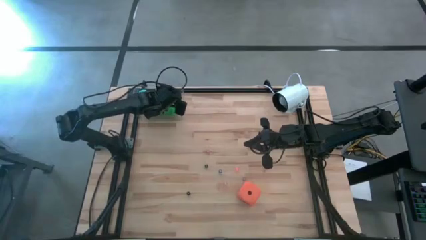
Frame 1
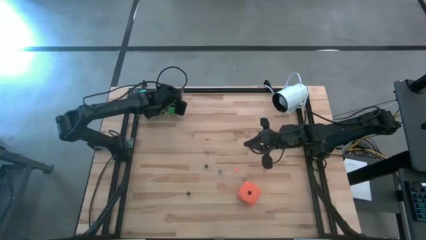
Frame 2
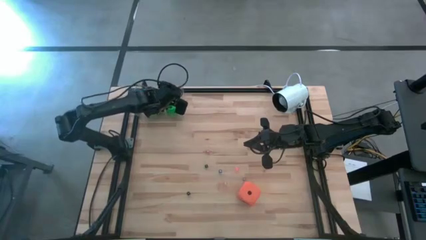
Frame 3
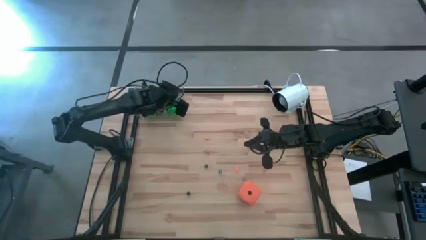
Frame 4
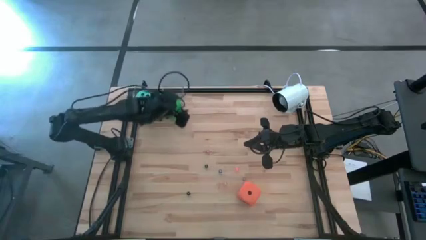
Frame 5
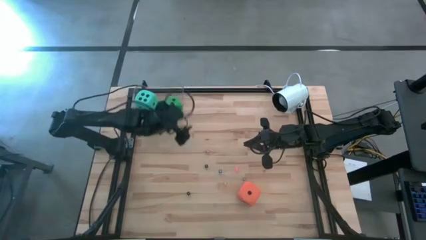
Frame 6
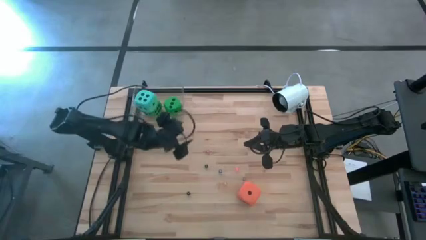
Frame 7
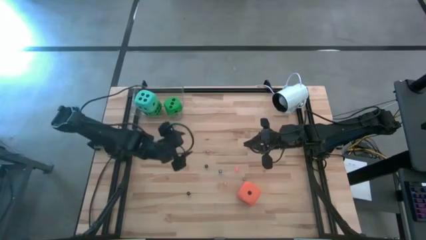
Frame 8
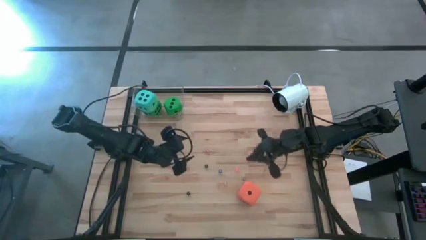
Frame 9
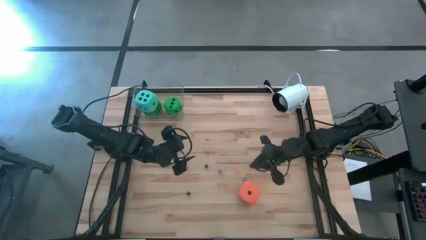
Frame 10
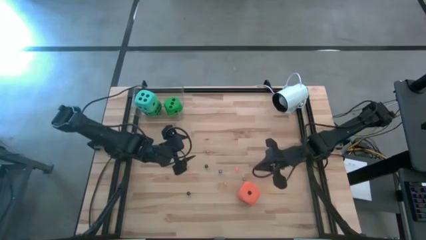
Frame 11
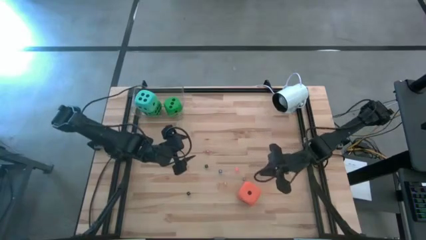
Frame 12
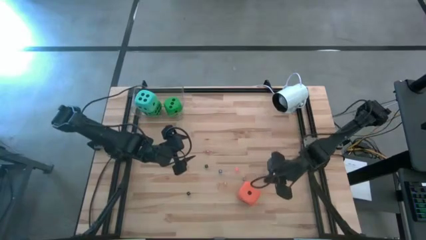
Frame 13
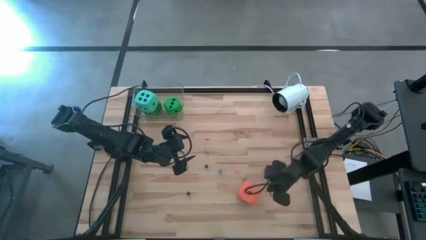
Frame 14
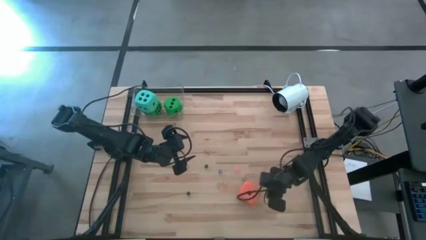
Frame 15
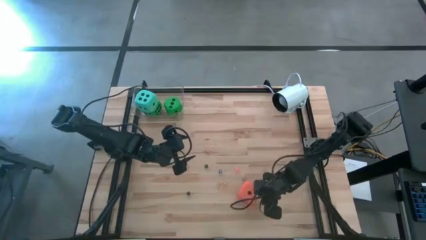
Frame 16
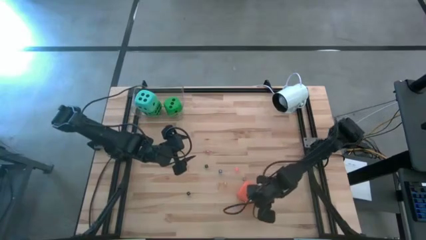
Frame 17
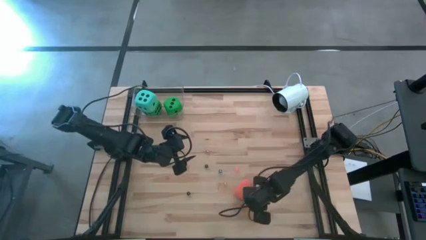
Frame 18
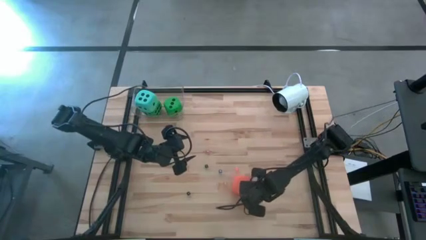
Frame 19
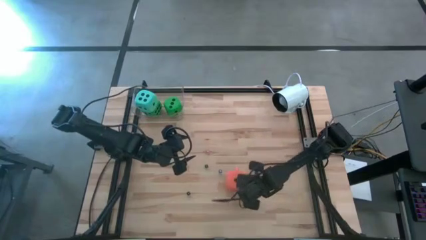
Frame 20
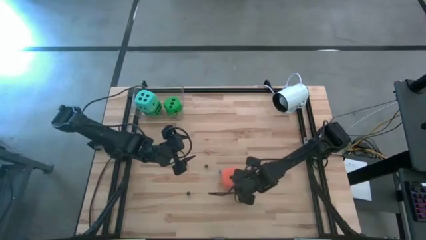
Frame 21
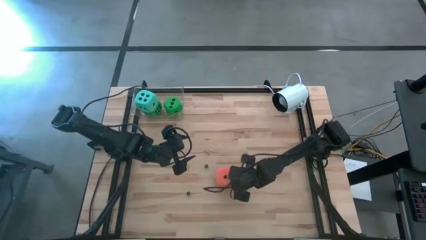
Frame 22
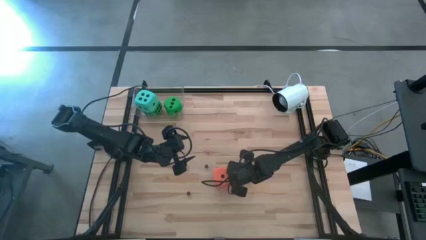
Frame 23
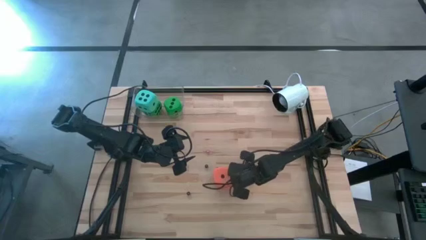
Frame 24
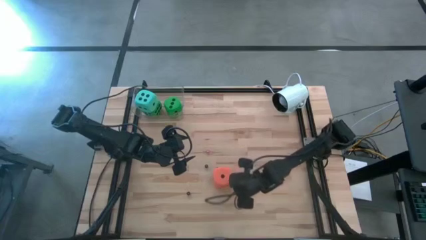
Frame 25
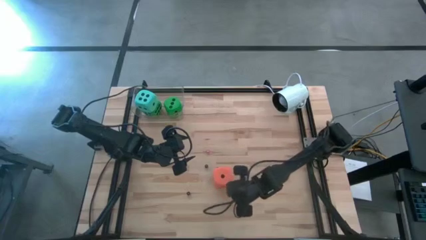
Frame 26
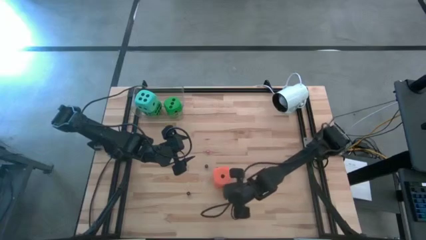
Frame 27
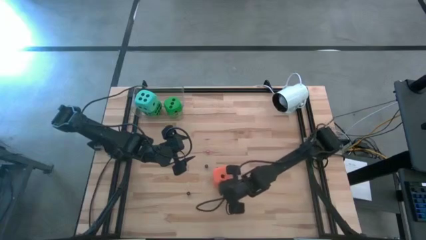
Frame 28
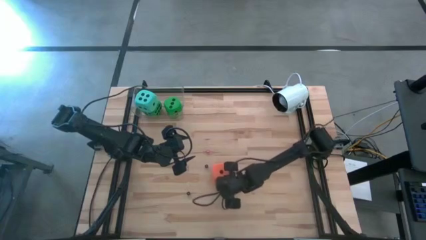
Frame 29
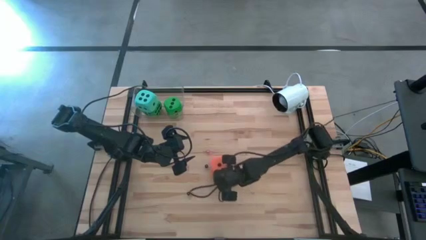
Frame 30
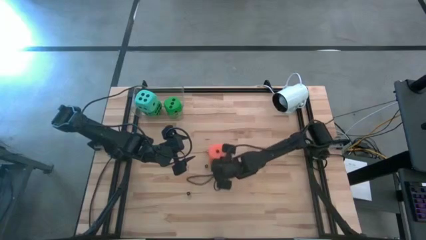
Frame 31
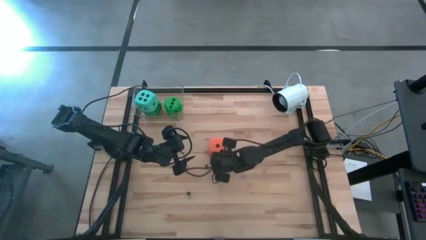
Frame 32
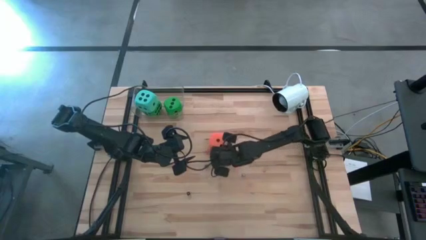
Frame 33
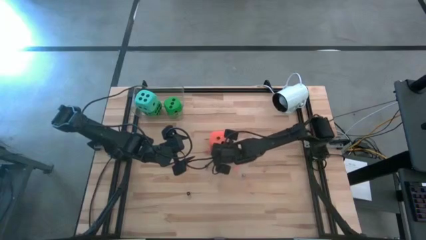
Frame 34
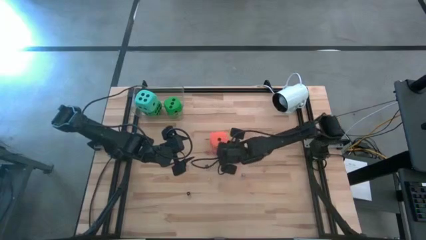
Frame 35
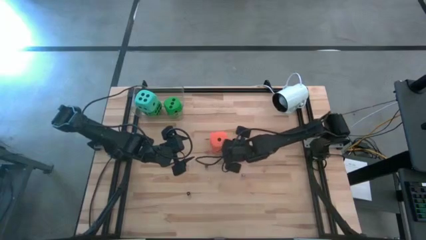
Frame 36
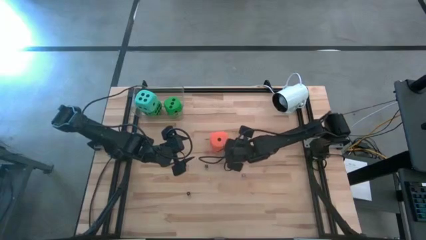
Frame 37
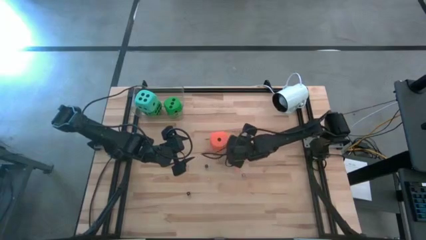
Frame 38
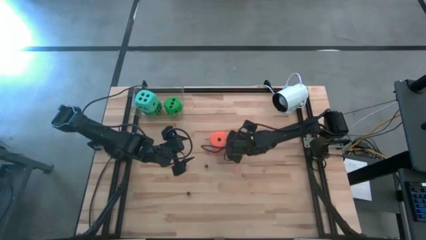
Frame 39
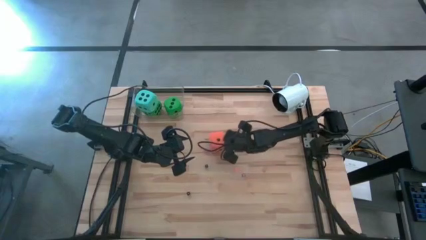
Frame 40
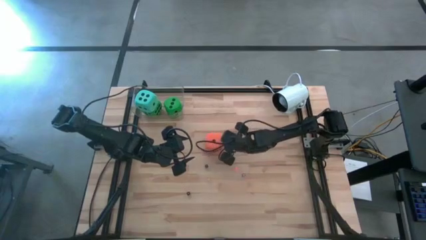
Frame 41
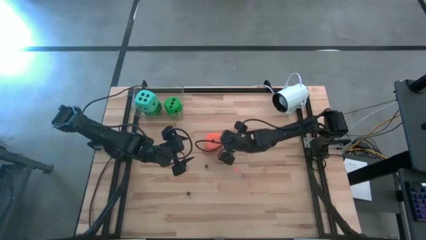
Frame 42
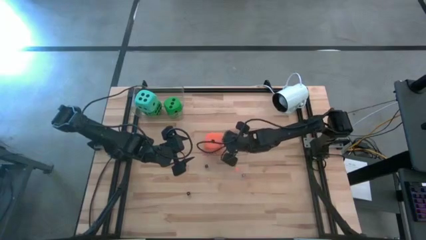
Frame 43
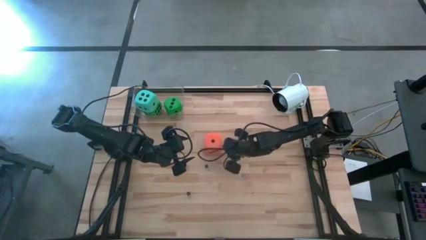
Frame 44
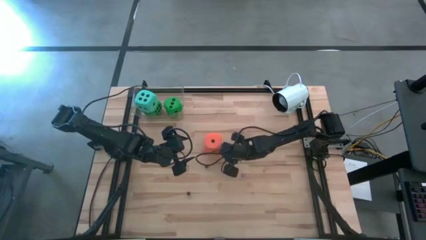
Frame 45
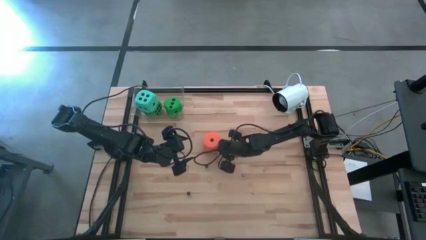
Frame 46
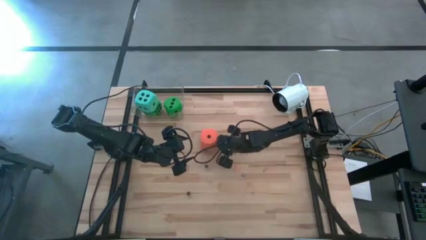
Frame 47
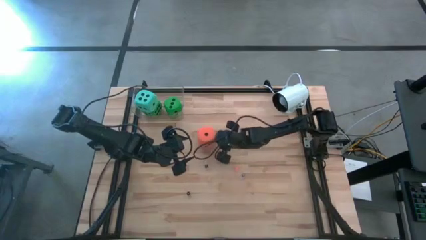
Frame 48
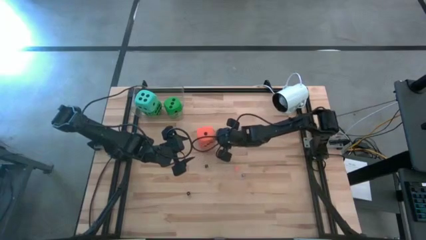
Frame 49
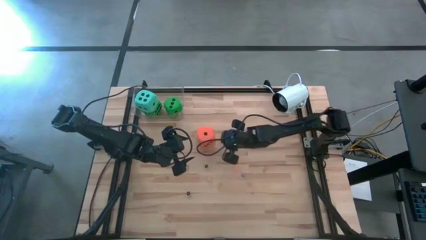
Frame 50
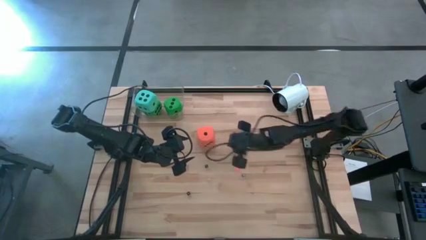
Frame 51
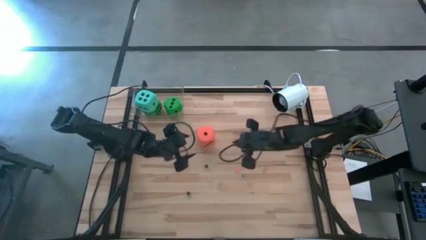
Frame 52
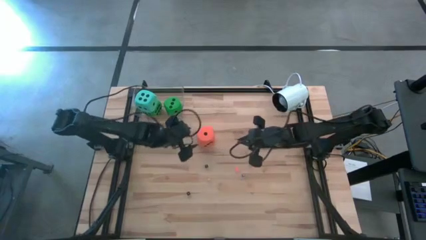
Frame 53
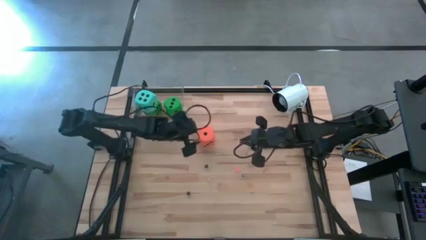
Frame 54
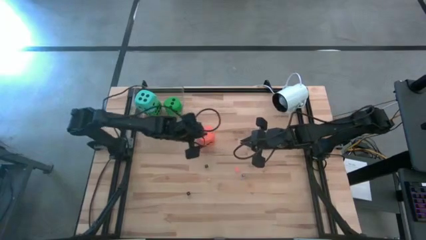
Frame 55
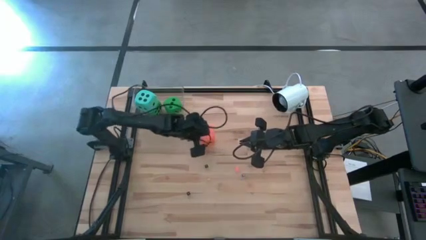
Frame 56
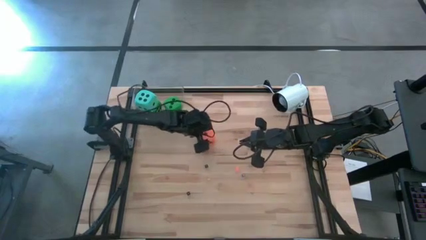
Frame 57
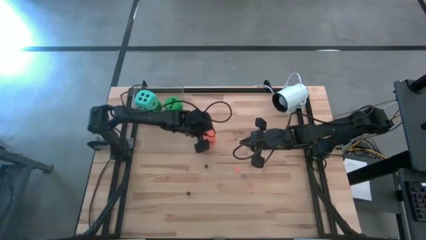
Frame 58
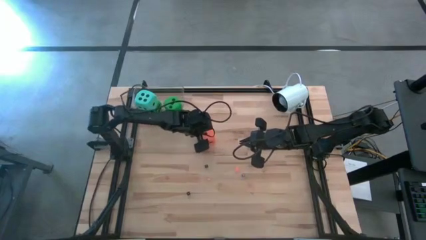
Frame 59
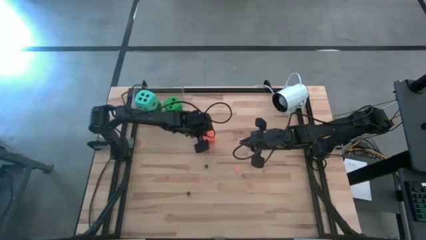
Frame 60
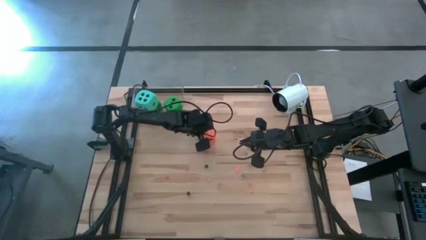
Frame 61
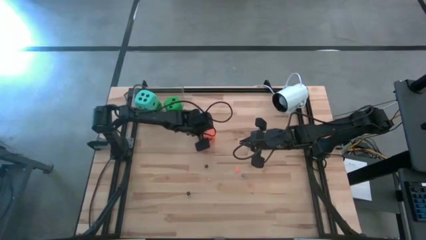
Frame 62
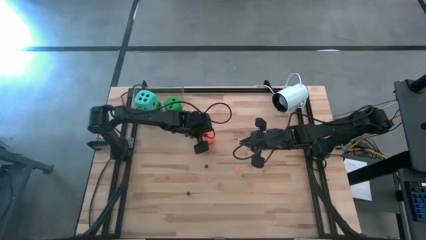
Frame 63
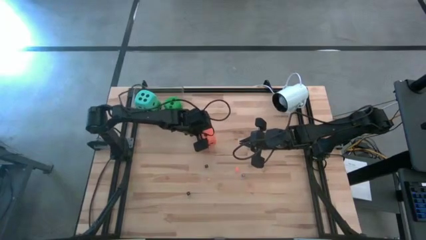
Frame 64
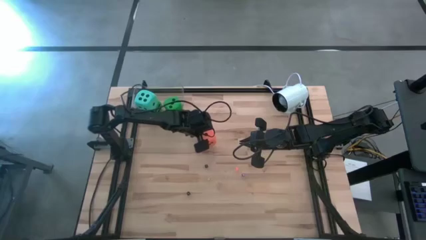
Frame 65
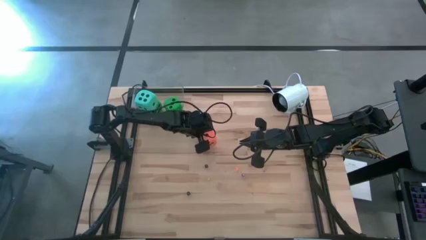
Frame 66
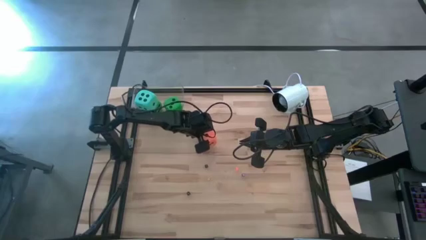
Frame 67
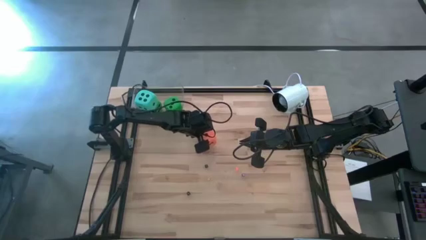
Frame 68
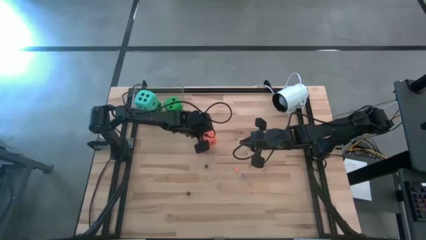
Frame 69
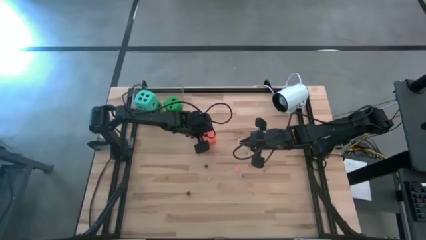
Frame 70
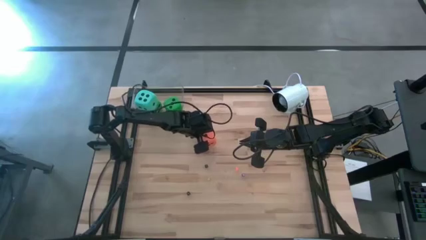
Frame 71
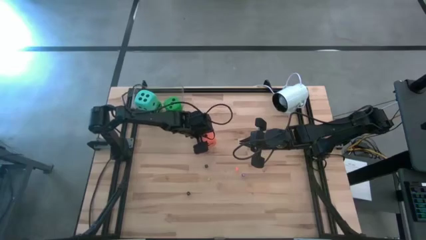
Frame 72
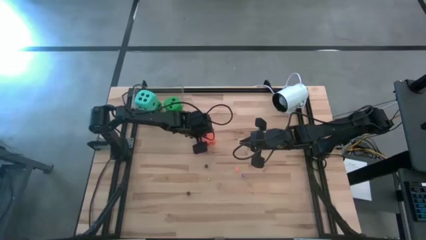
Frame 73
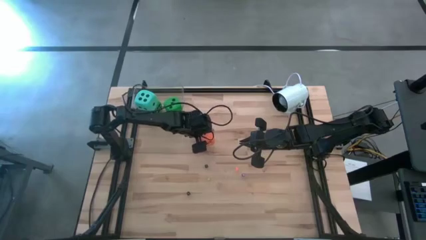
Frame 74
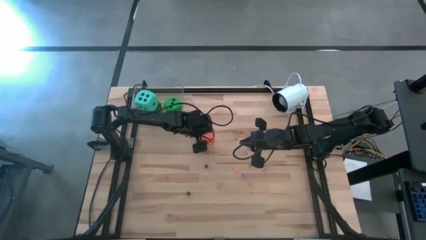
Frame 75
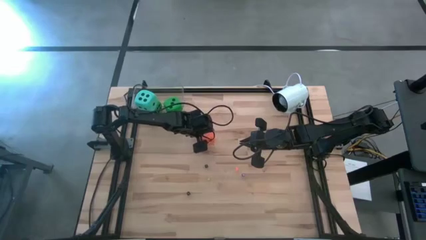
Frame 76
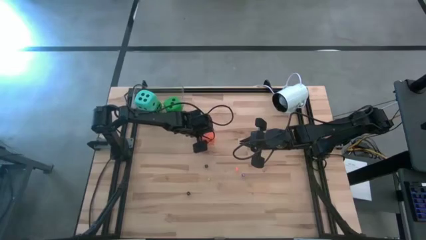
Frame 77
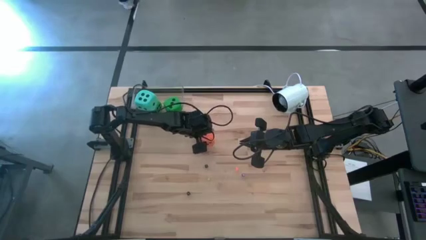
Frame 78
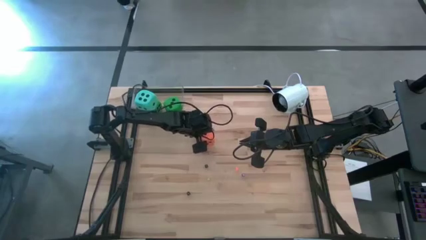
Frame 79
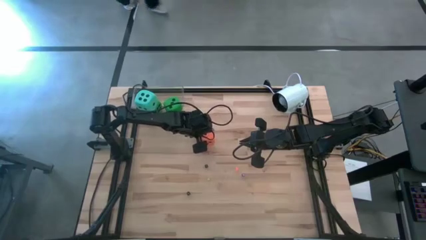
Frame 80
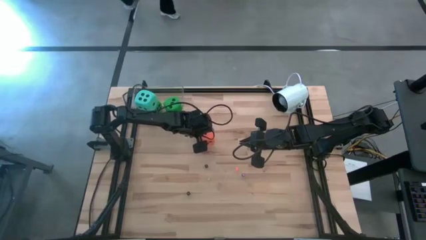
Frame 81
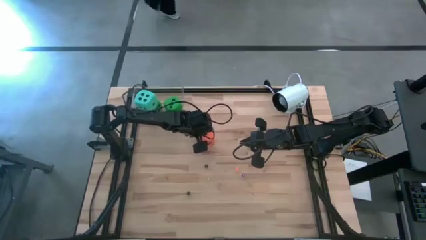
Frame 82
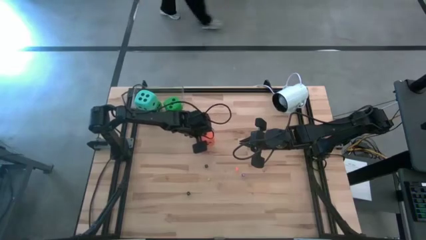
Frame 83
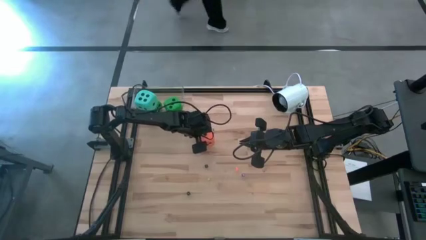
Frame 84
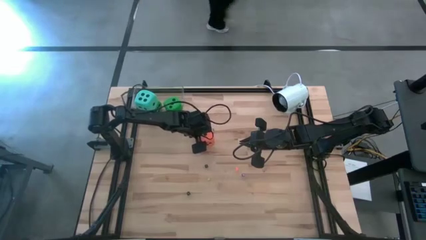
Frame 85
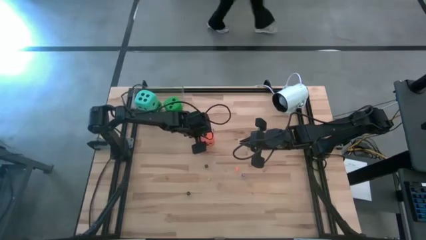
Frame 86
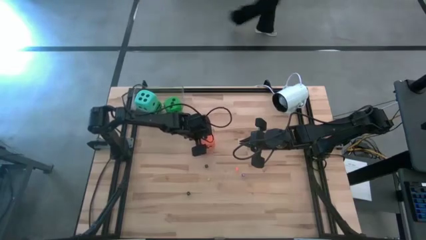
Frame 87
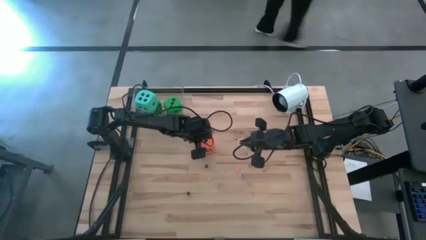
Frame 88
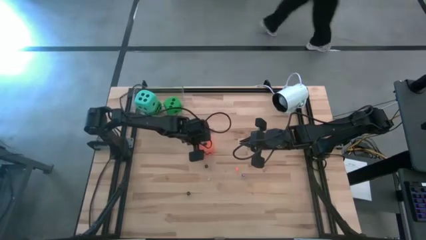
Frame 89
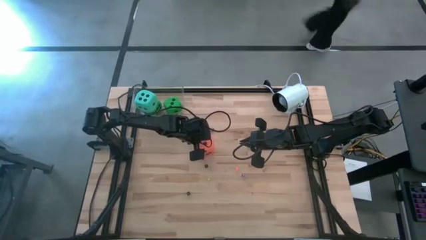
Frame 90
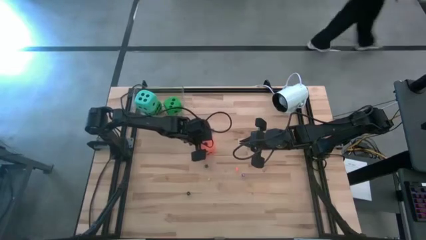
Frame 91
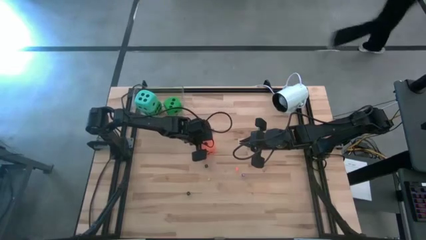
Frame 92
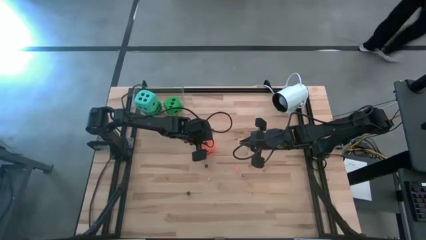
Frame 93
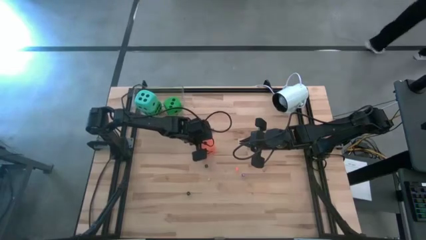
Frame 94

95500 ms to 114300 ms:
Task: Pick & Place Dice
Put the large orange die into the transparent bin
